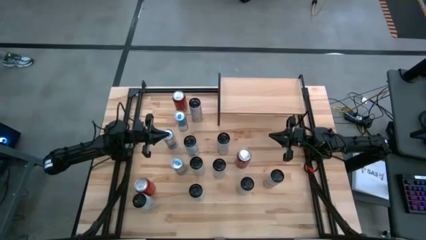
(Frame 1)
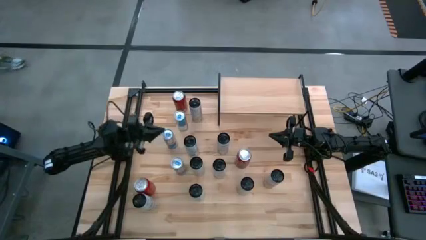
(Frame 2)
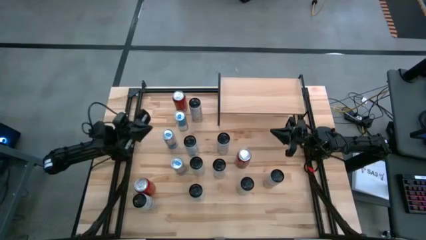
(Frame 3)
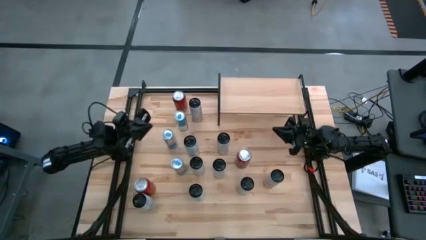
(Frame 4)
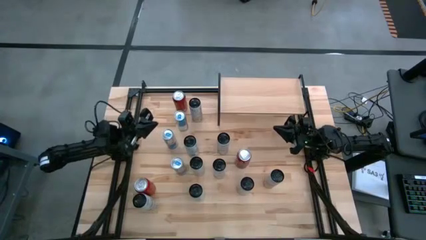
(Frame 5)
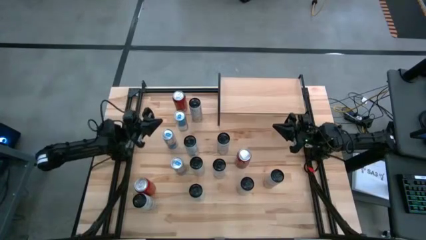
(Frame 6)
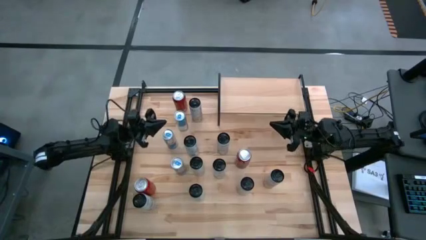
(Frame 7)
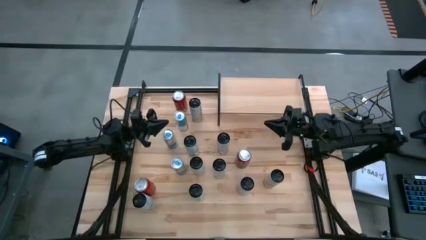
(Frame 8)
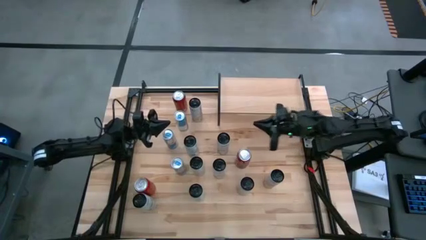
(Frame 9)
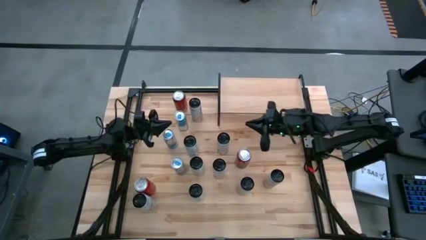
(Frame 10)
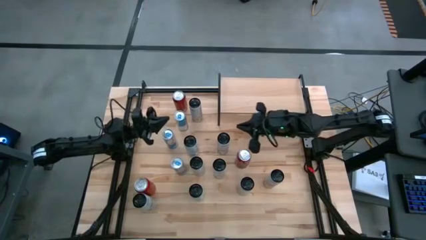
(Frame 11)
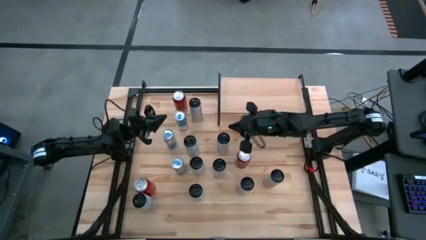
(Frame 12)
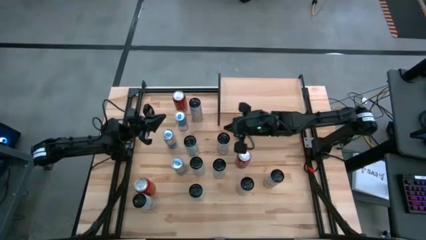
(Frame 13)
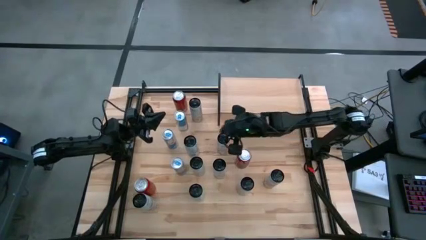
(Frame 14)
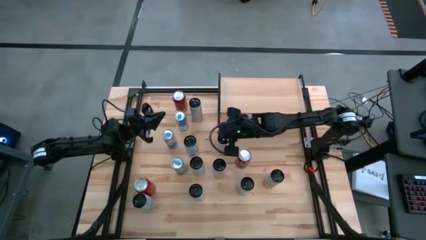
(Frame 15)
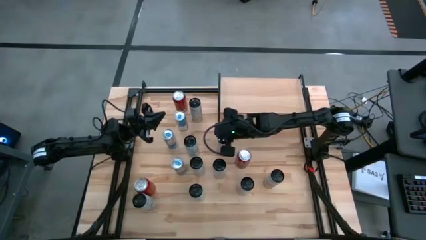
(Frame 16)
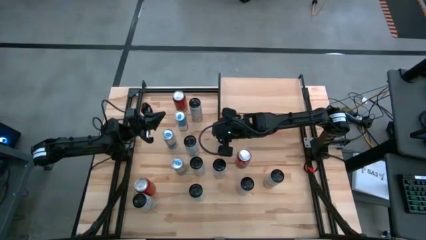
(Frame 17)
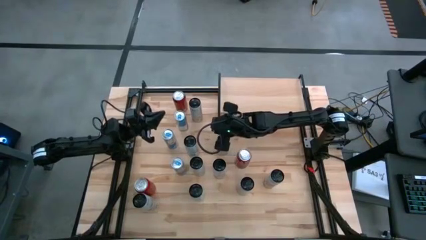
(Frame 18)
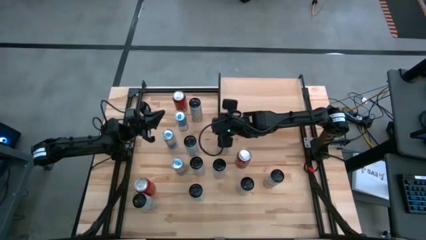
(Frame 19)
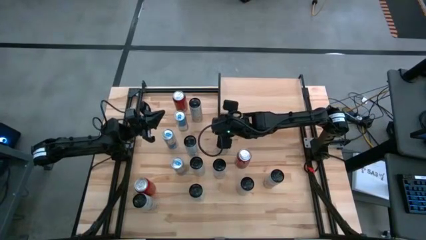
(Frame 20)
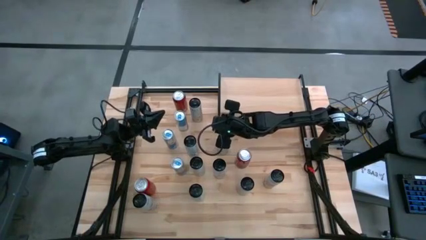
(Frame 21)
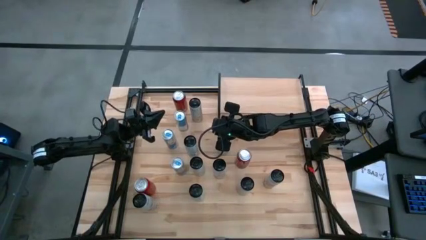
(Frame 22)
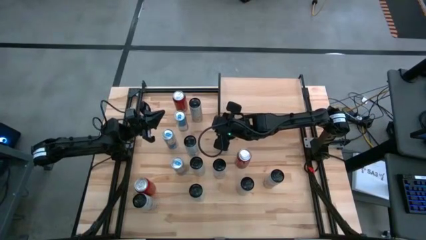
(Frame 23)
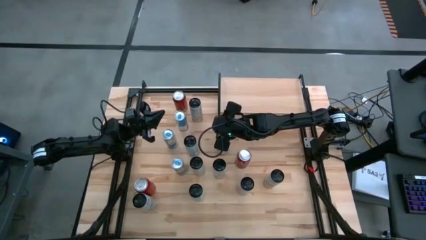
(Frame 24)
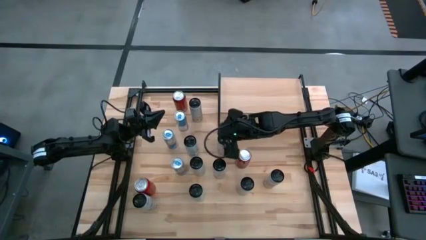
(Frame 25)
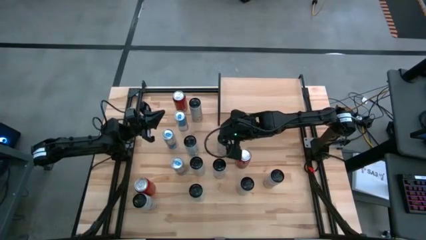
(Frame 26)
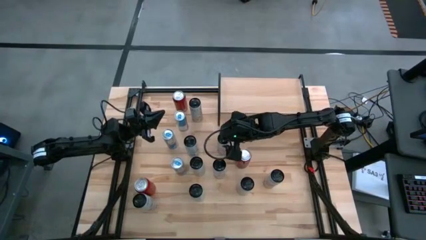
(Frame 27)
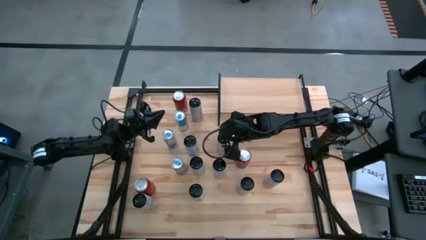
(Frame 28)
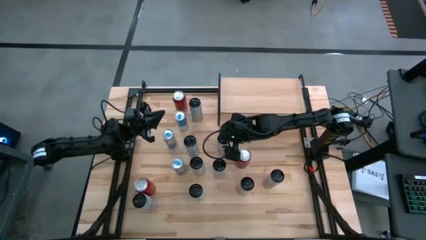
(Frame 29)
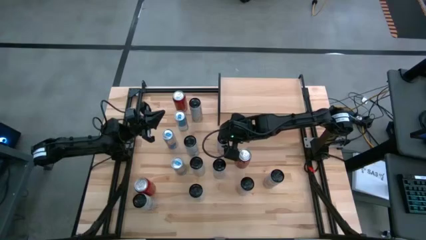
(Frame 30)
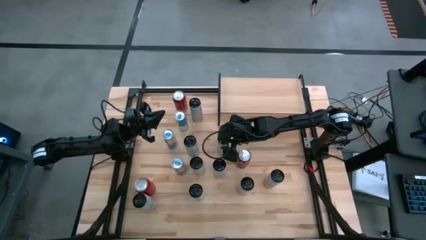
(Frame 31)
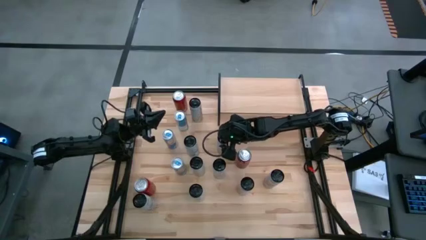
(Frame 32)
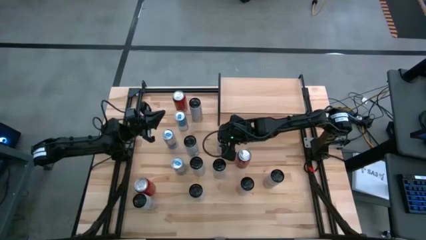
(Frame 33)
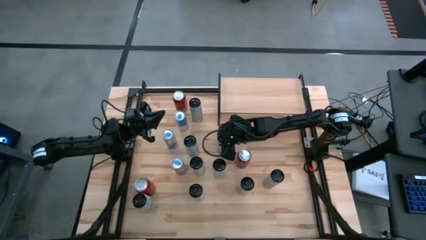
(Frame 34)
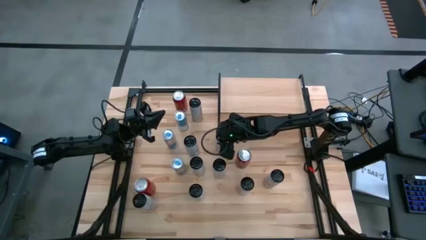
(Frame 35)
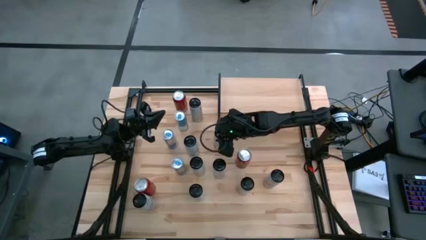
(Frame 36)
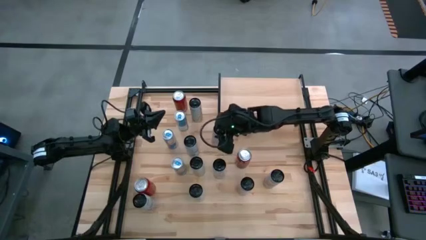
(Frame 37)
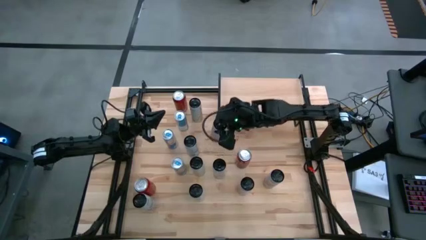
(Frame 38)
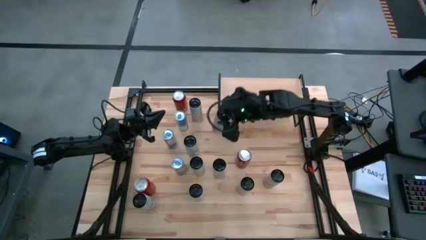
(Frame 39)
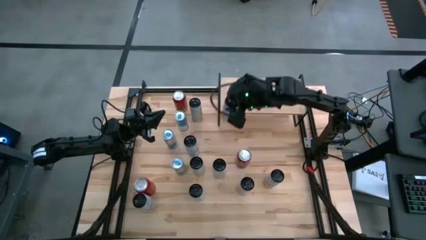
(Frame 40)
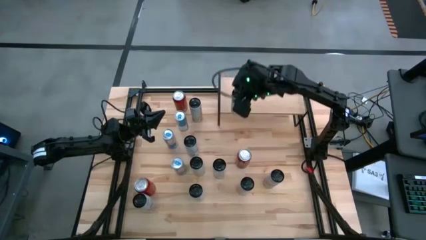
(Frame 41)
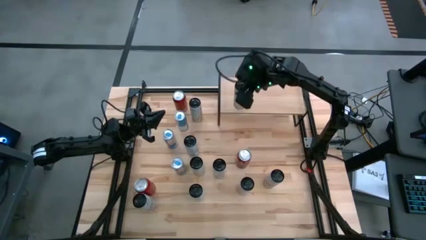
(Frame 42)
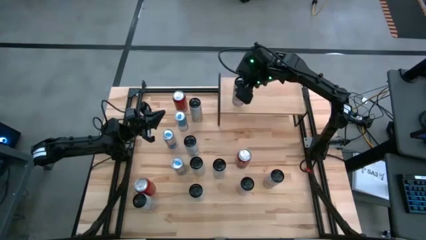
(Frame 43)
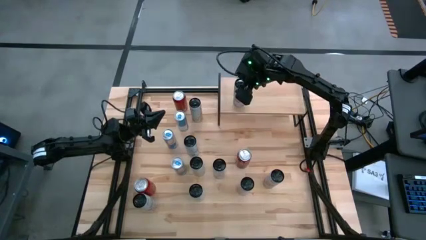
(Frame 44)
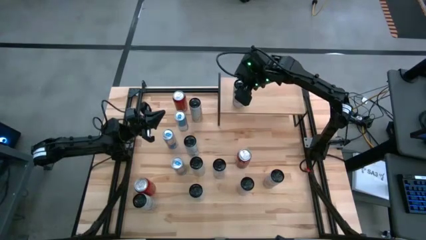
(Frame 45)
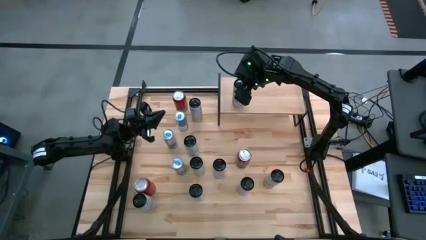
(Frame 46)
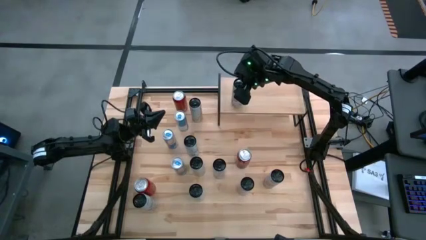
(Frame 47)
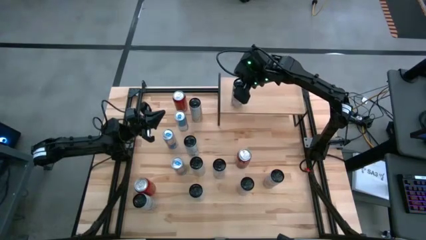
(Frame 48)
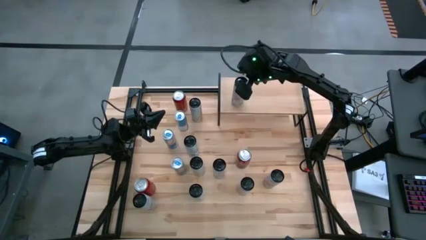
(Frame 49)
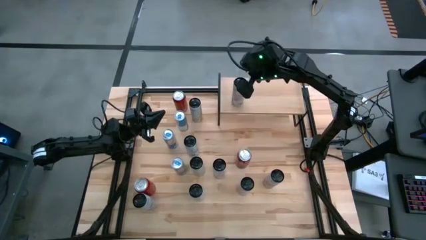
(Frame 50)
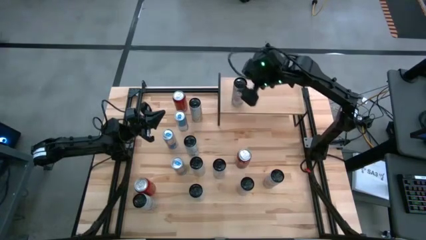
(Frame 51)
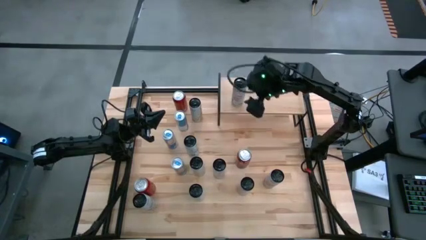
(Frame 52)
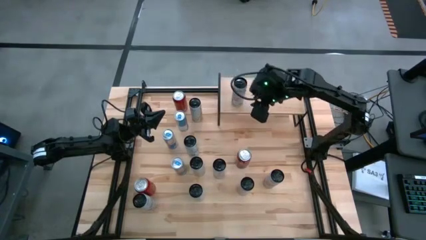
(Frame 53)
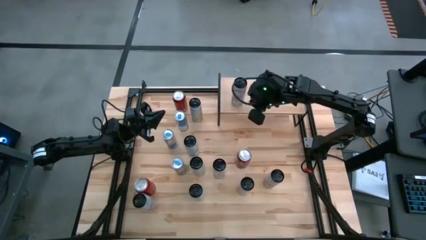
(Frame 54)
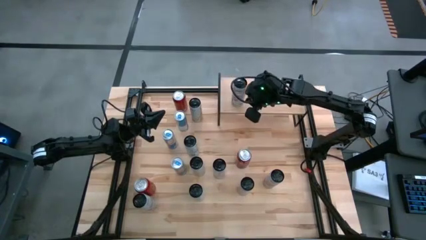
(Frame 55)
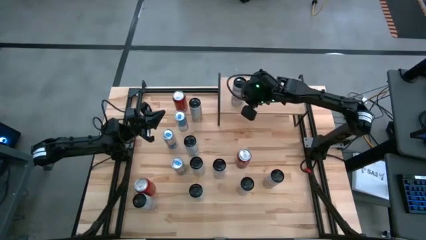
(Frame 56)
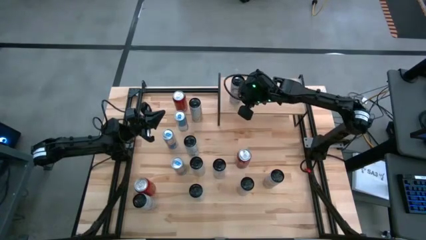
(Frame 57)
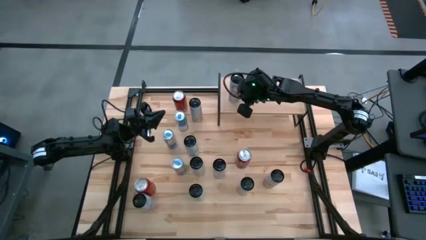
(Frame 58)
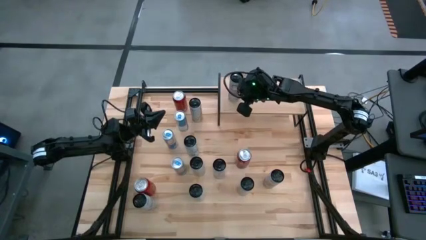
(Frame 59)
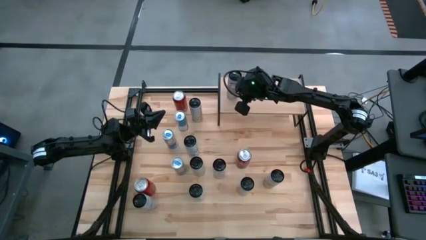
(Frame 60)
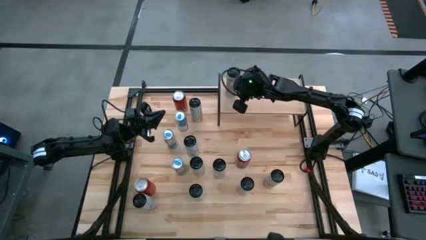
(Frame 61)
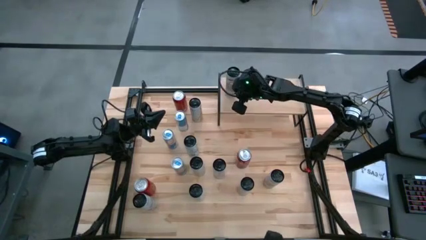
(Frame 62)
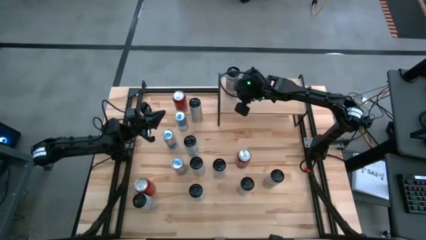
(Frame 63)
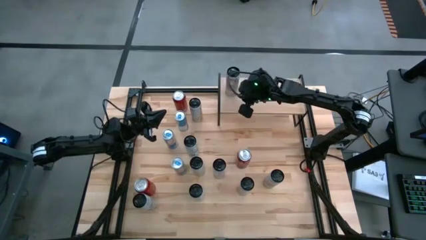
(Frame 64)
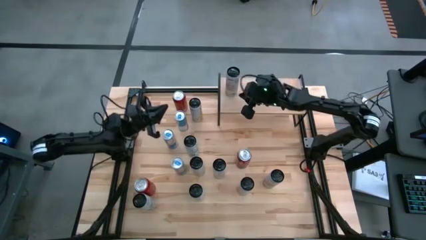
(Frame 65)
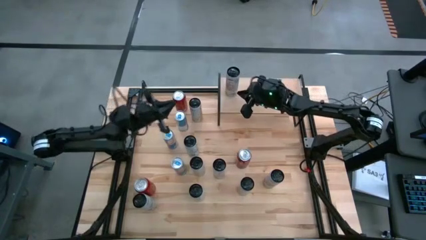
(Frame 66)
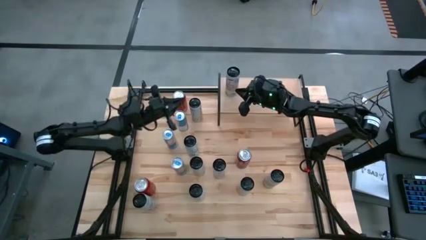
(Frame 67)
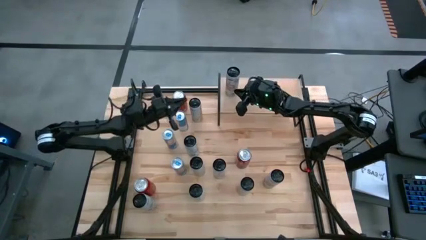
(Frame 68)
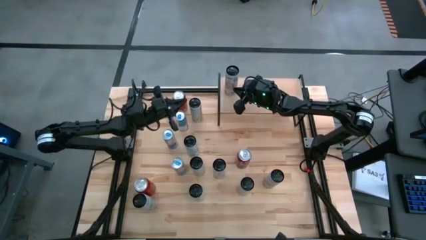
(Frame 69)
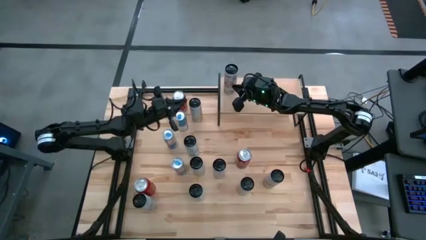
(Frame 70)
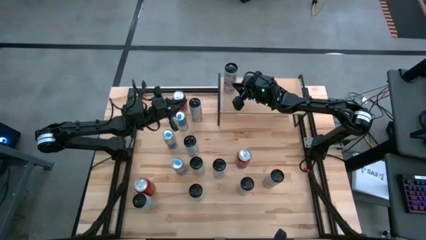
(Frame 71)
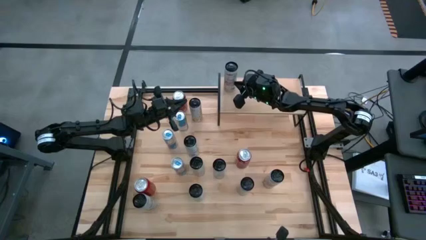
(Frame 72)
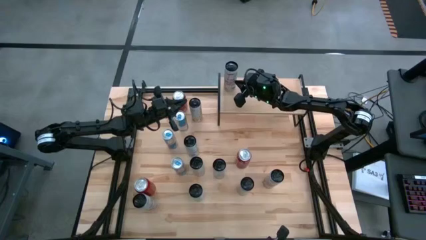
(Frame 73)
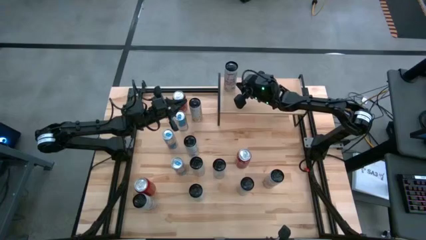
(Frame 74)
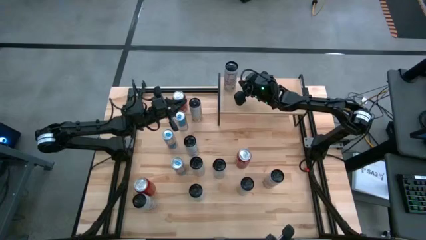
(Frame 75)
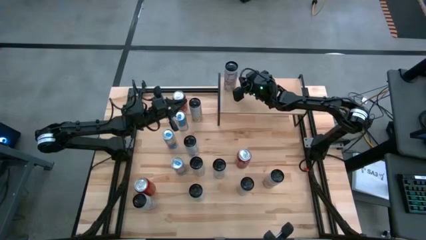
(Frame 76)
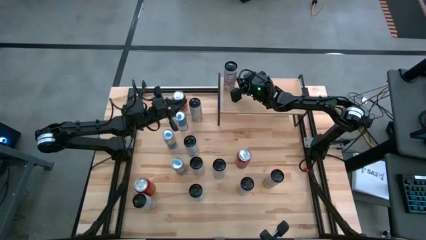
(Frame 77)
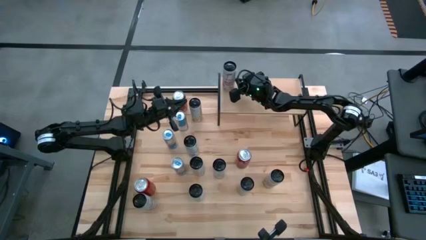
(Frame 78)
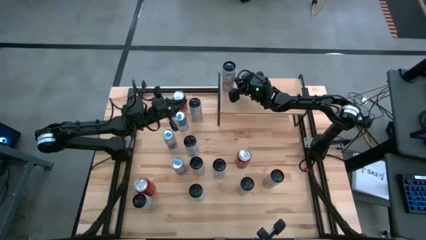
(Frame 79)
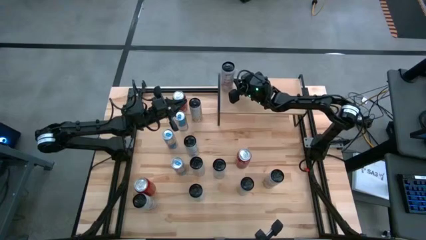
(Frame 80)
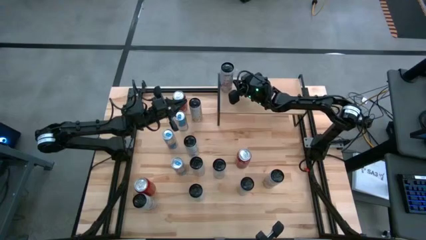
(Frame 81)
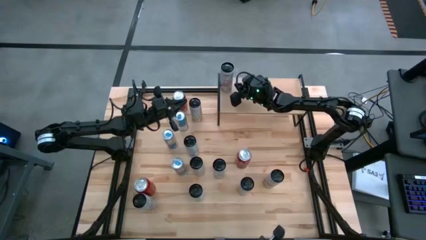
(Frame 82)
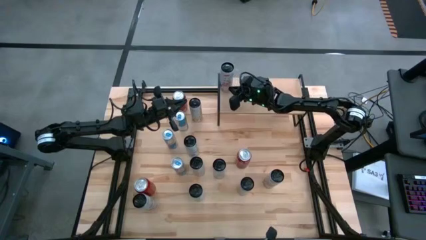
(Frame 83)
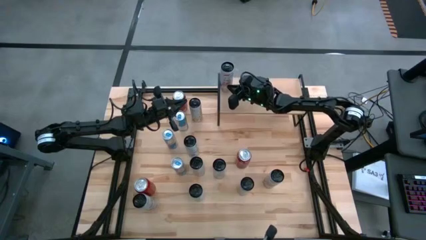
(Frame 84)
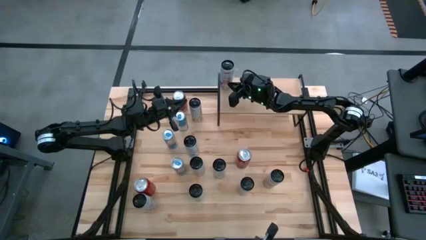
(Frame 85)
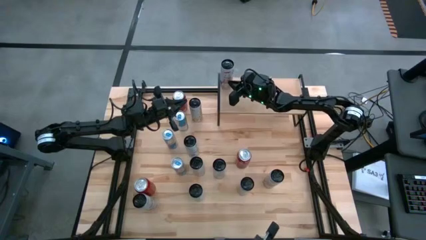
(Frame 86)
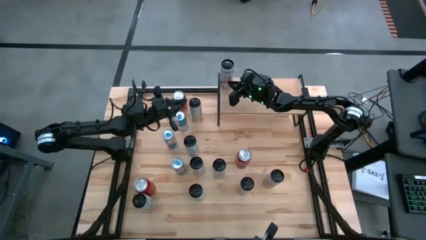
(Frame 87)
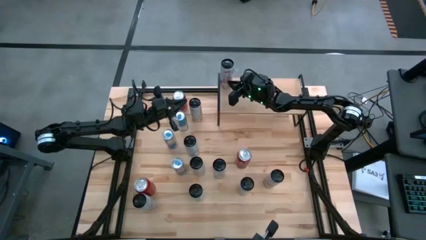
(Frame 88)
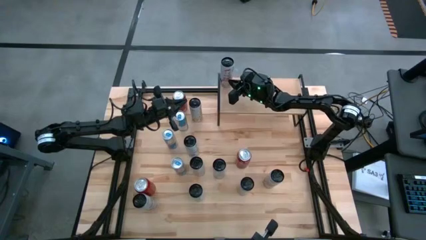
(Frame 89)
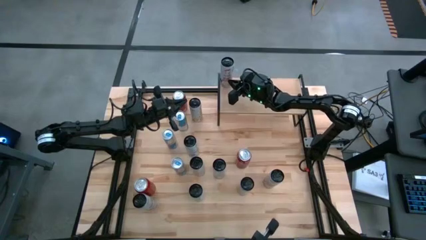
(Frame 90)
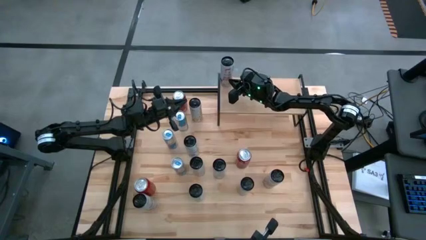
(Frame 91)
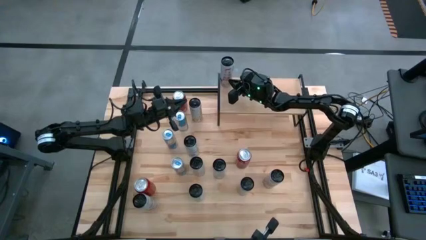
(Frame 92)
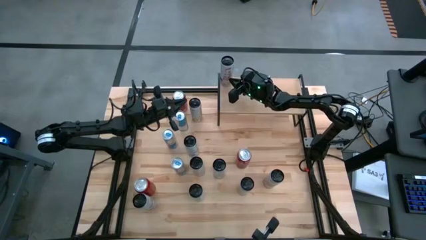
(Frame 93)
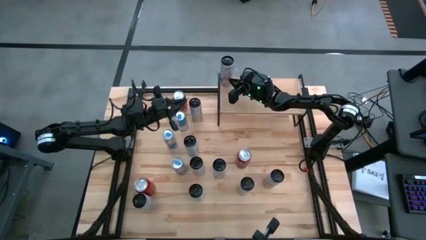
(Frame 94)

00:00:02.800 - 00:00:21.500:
Task: Place canned beverage on shelf
Put the top white pink soda can on the shelf
